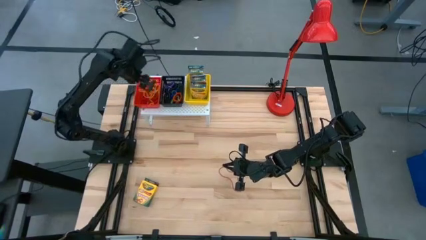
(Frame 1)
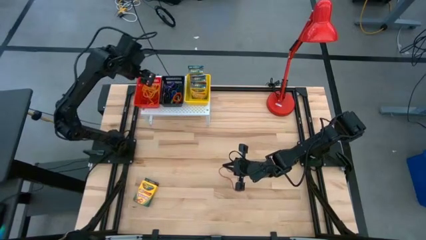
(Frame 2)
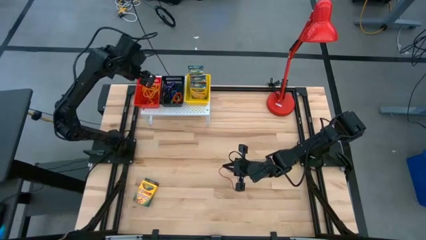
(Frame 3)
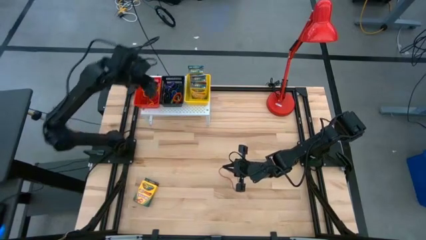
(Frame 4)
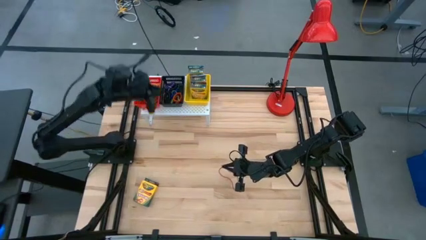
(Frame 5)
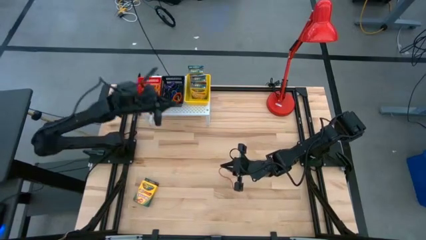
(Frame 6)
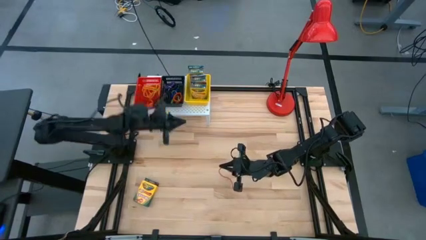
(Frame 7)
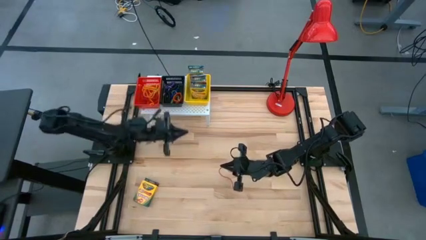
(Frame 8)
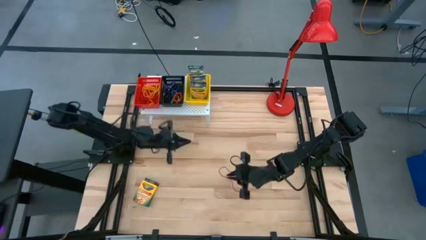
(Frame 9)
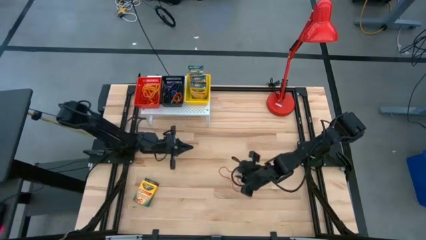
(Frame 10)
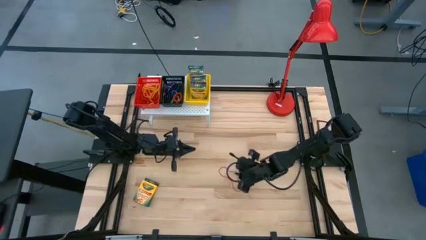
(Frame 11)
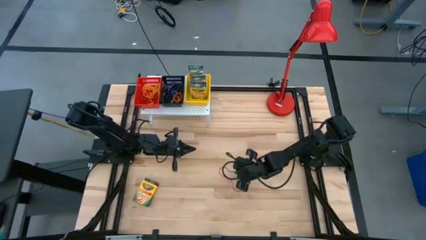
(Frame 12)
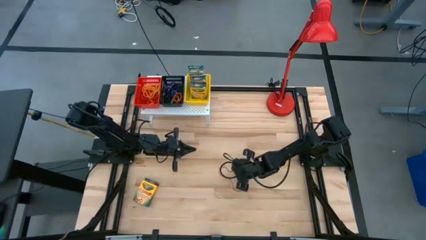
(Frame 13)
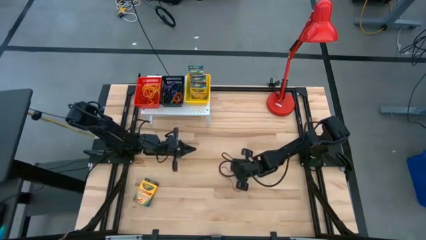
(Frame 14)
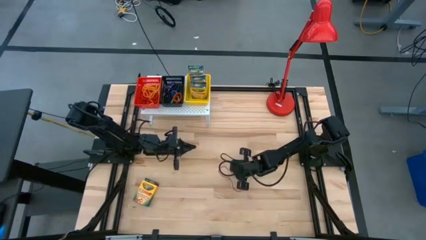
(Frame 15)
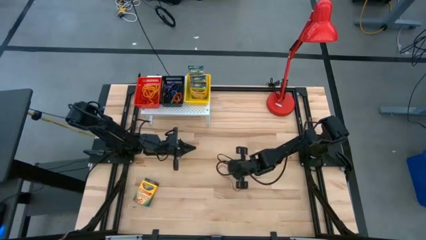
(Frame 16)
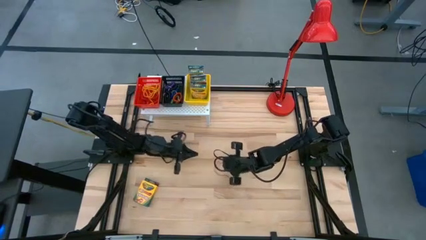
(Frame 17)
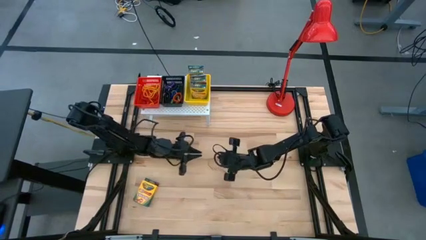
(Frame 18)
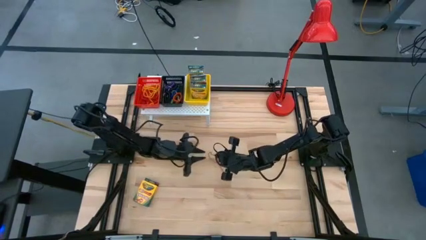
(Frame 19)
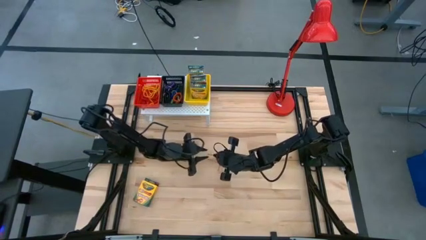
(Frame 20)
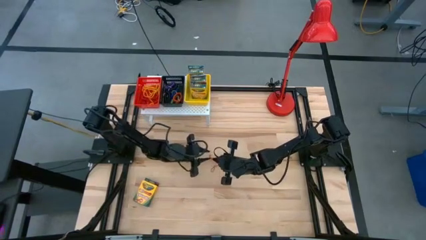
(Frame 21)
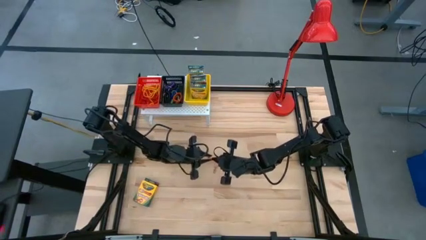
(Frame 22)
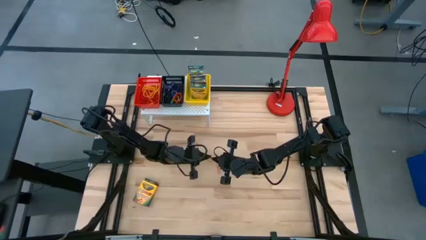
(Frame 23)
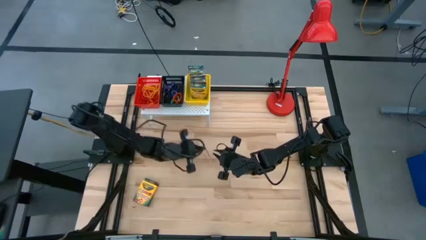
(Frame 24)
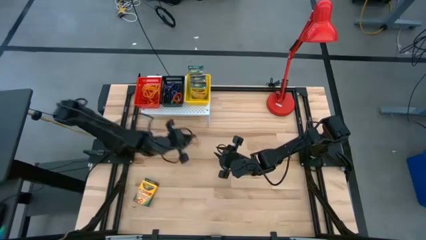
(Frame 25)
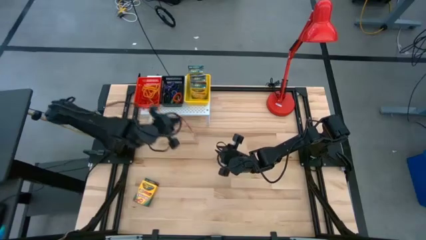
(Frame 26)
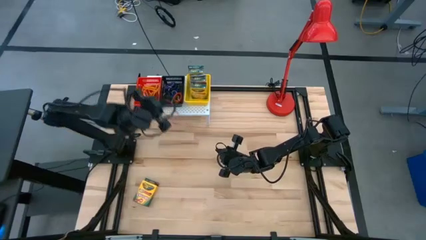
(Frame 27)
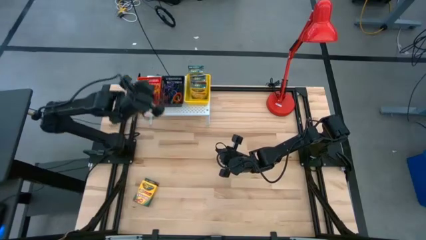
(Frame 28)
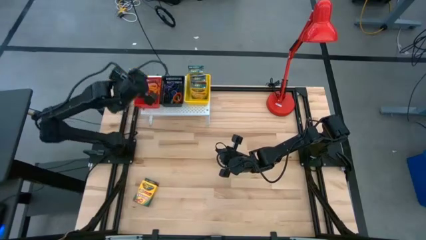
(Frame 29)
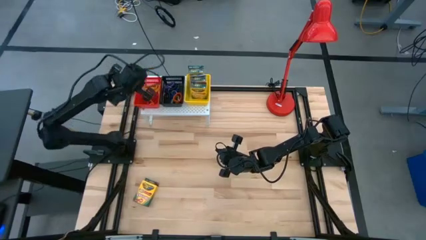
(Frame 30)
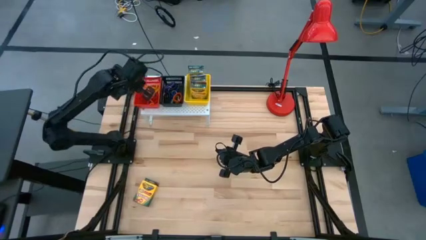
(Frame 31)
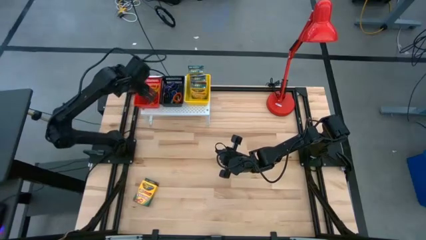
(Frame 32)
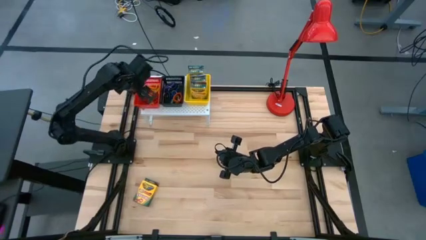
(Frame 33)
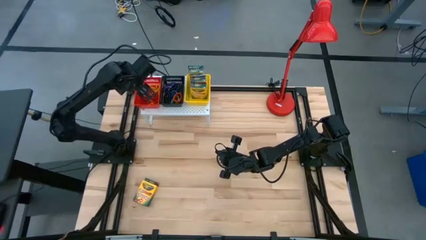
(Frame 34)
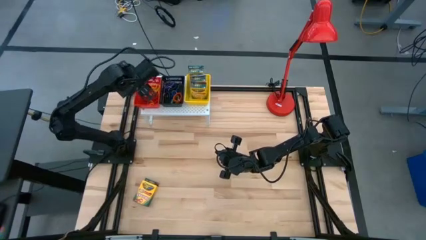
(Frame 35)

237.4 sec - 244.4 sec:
Task: Pick & Place Office Desk Supplies
Put the red rubber band into the red bin on the shelf

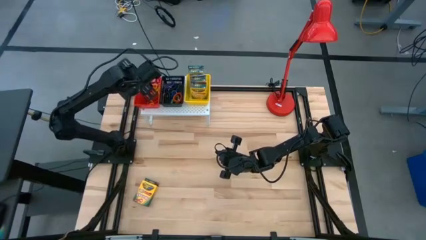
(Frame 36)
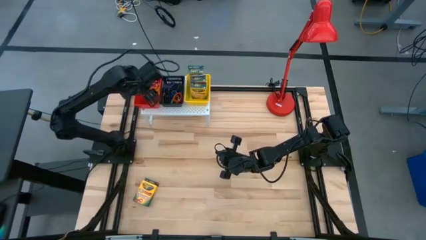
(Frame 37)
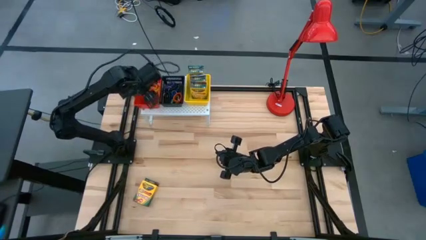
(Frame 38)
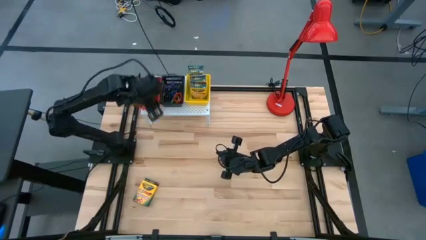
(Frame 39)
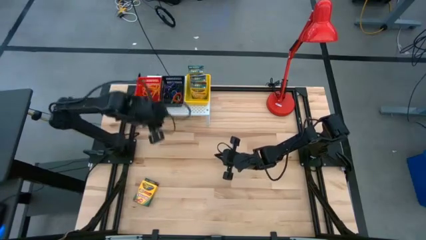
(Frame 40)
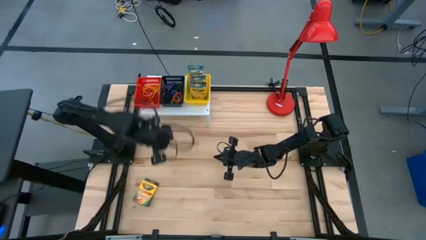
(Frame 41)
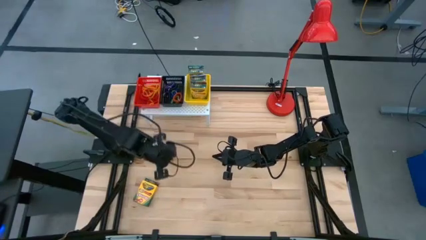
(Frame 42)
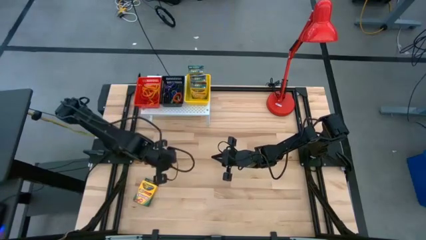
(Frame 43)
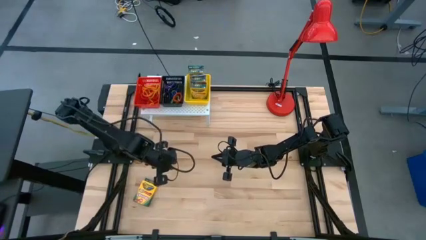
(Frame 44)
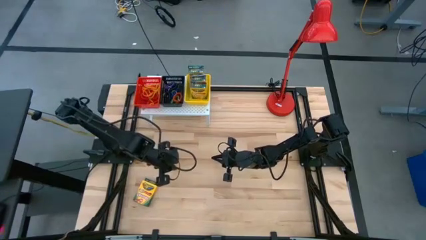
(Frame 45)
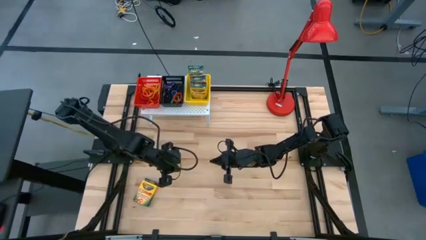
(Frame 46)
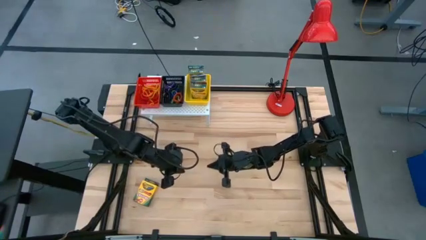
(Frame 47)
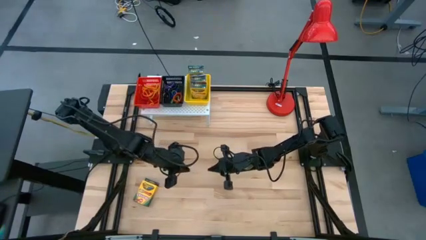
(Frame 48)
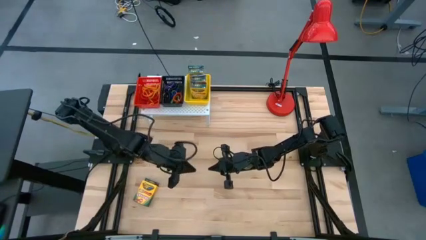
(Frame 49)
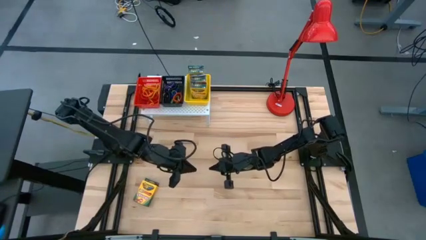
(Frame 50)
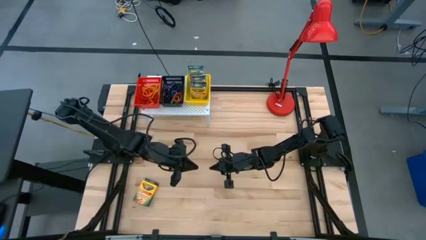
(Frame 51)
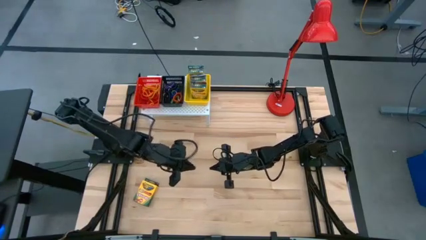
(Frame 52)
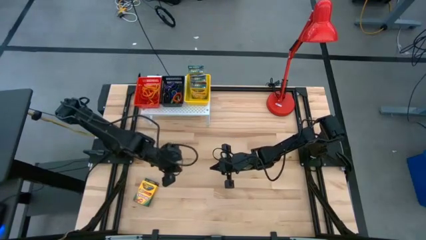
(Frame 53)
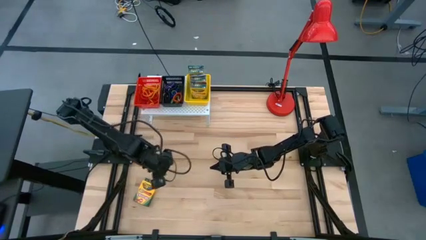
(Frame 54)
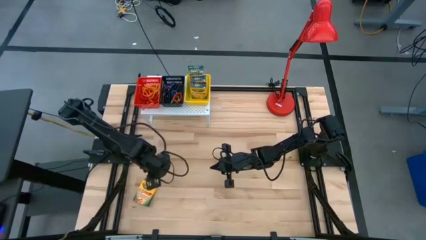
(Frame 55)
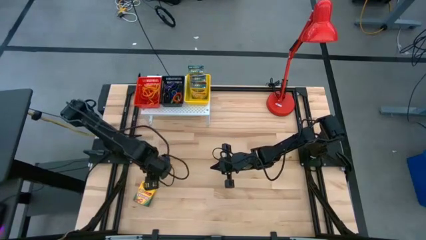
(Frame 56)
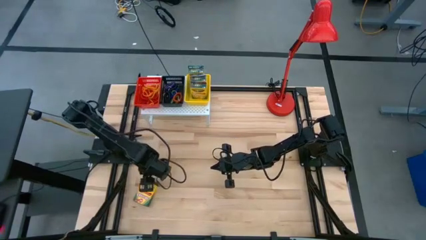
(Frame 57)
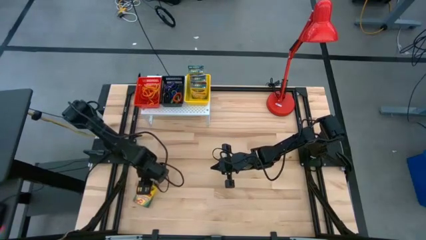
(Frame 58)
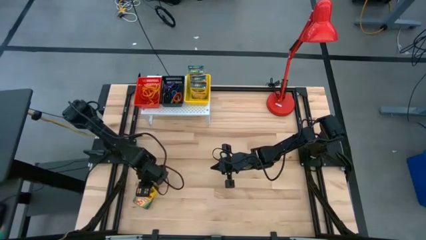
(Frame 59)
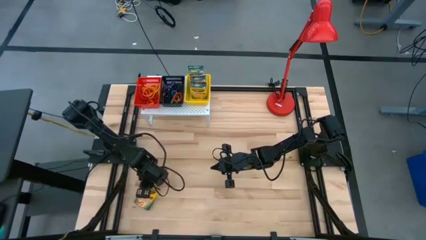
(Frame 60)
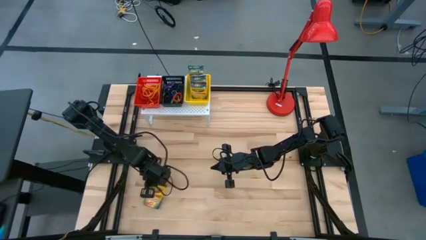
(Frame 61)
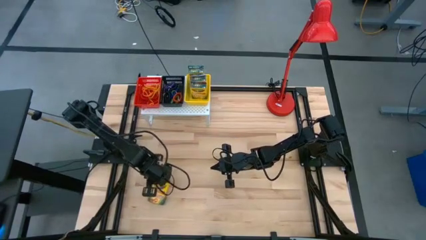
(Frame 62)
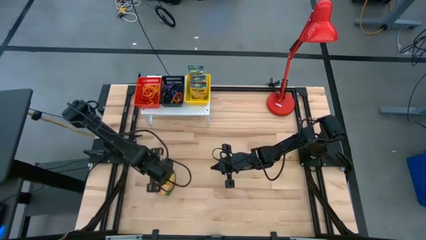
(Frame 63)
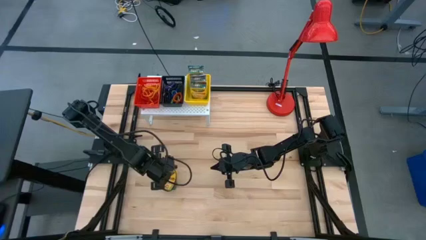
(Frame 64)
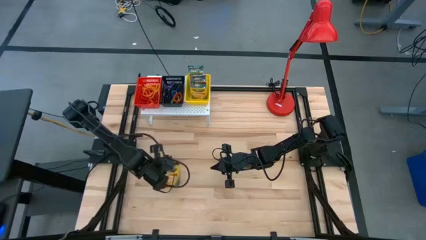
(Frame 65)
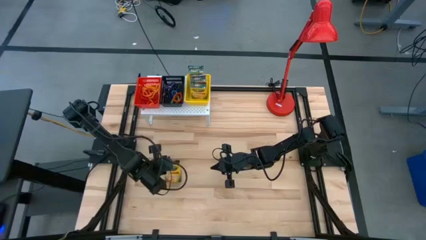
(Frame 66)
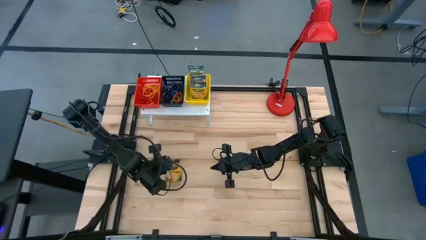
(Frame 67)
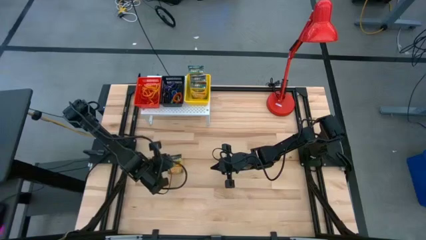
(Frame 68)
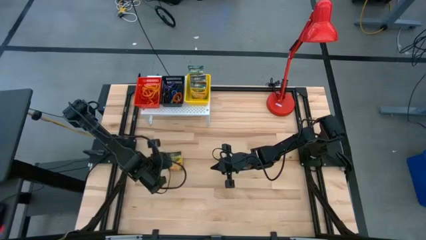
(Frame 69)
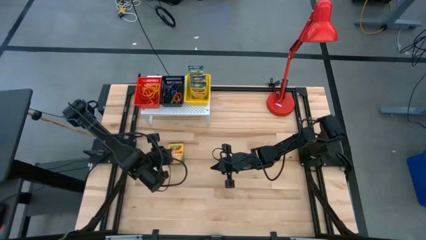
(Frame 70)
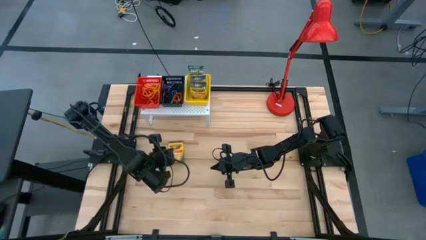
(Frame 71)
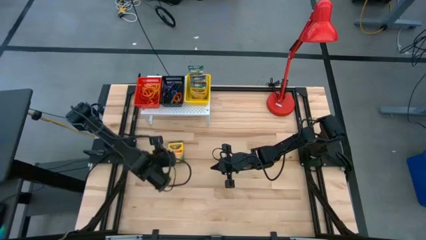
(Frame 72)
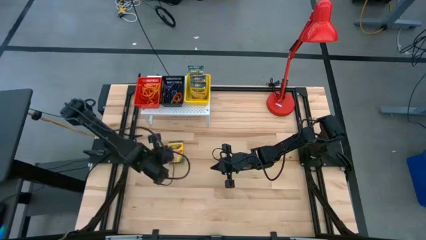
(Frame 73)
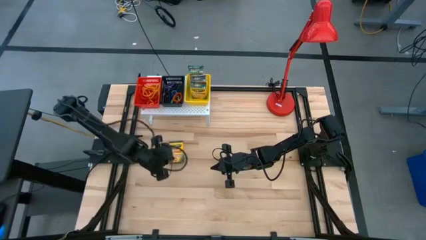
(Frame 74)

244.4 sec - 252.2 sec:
Put the crayon box into the yellow bin on the shelf

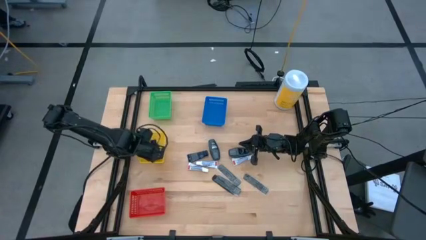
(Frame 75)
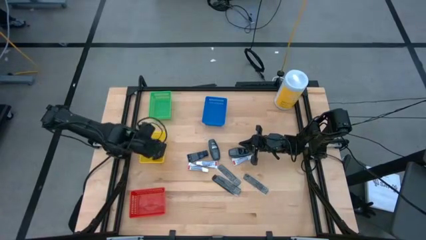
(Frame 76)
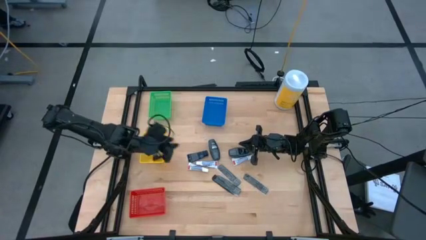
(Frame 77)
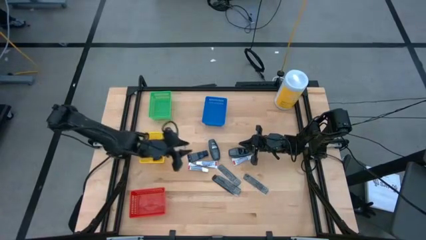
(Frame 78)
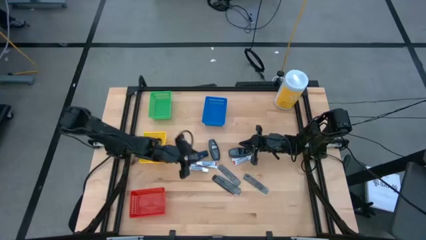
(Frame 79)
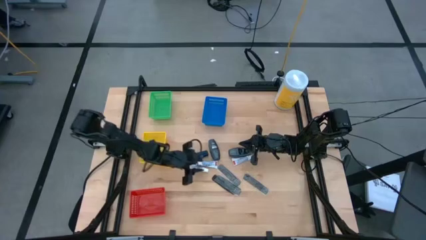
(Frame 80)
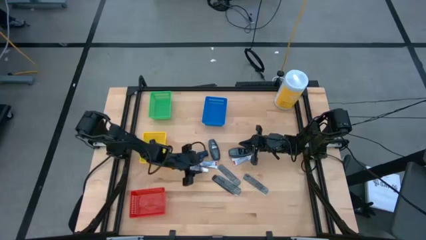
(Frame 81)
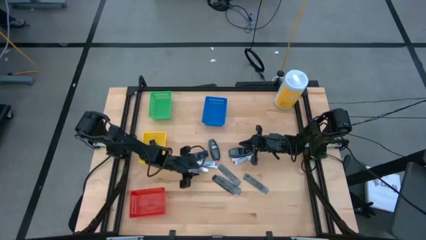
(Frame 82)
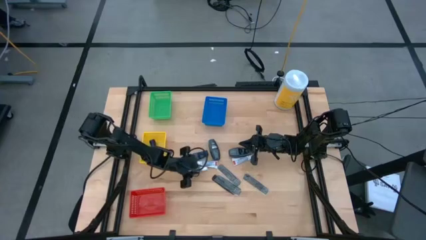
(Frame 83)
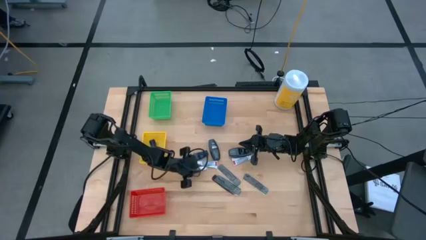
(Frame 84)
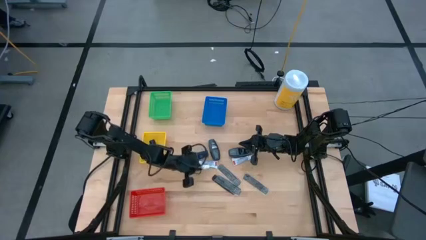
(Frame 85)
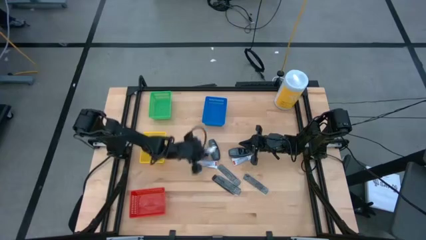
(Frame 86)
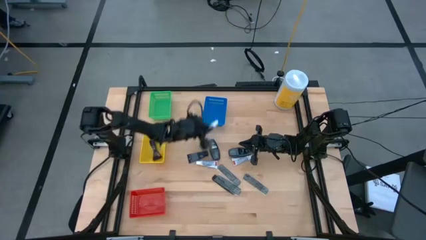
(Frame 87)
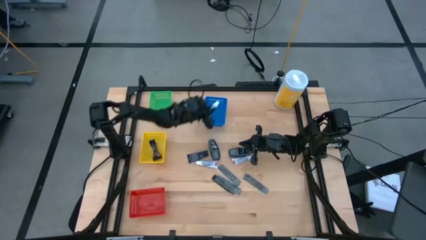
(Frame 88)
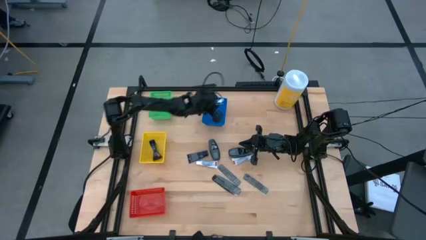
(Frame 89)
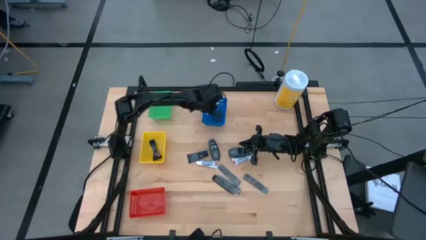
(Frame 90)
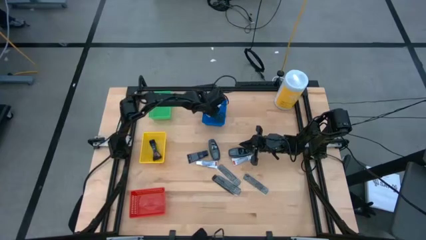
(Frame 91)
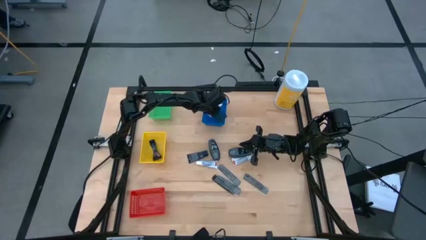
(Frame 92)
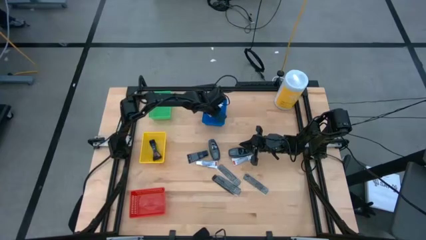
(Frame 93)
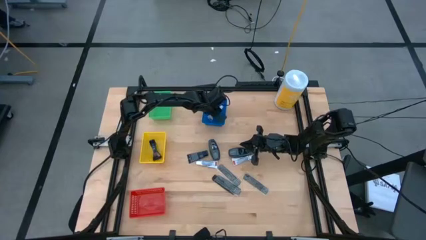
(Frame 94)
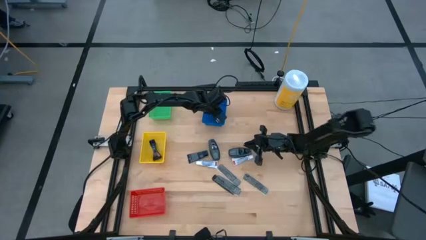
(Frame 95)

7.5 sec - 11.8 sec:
Task: Pick & Place Travel size toiletries
Put the white toothpaste in the blue basket
